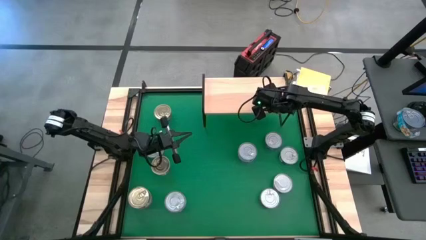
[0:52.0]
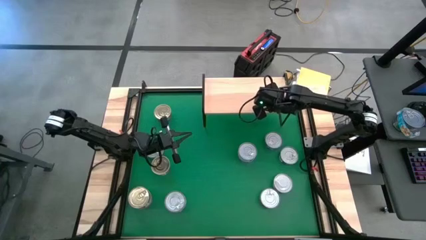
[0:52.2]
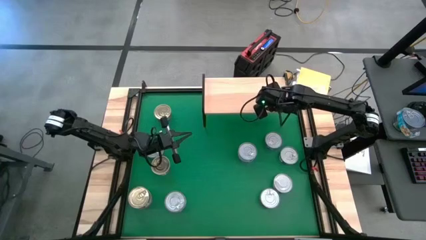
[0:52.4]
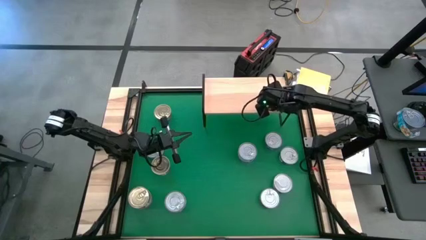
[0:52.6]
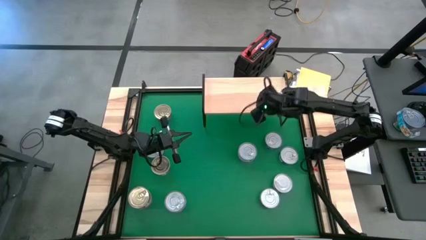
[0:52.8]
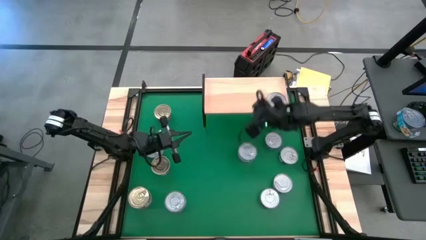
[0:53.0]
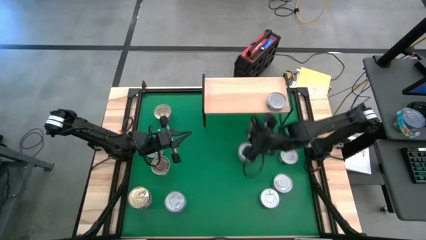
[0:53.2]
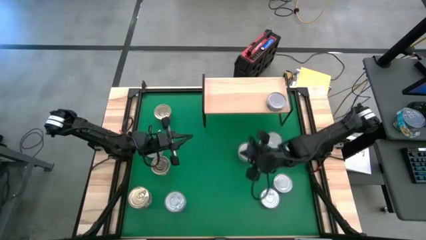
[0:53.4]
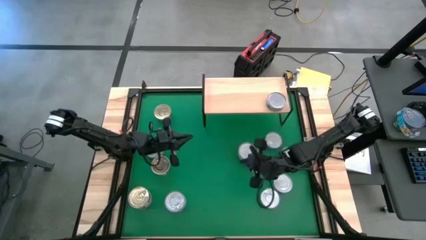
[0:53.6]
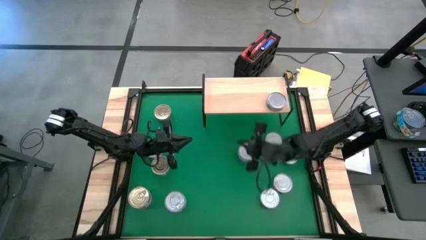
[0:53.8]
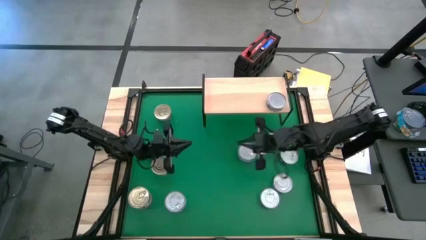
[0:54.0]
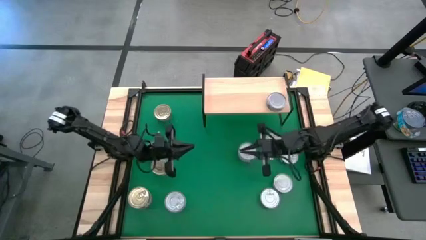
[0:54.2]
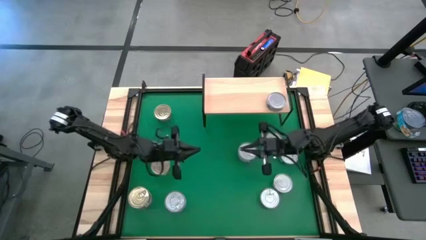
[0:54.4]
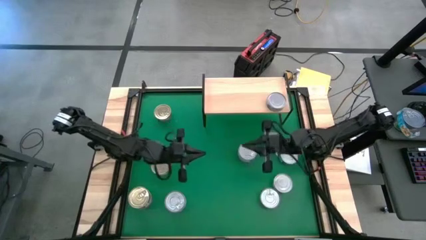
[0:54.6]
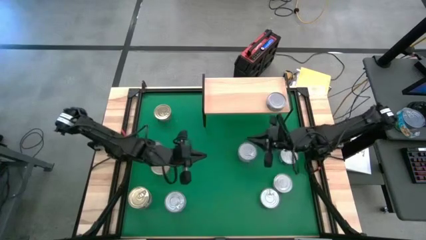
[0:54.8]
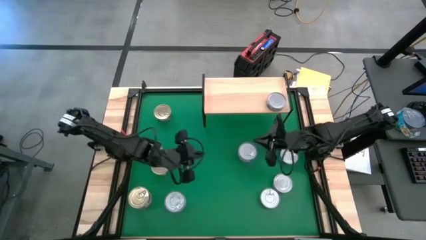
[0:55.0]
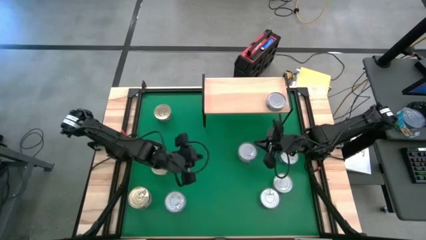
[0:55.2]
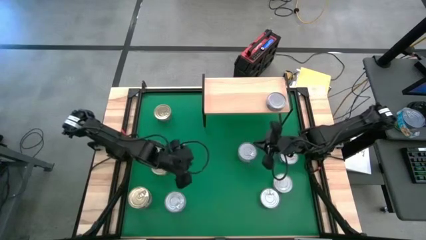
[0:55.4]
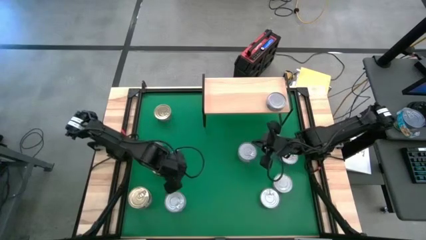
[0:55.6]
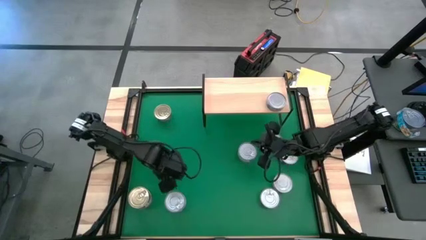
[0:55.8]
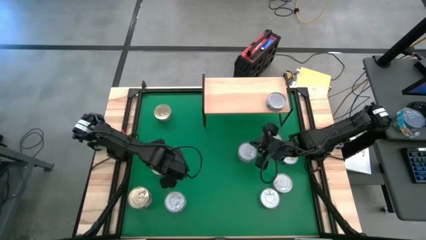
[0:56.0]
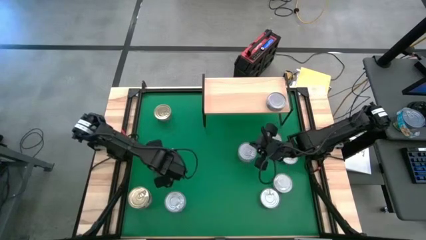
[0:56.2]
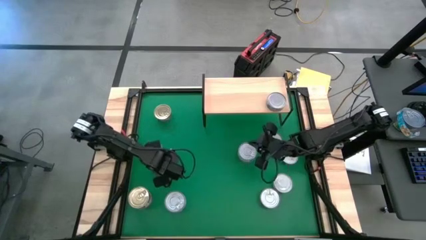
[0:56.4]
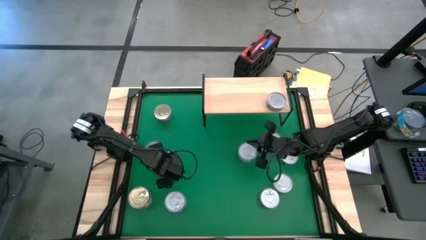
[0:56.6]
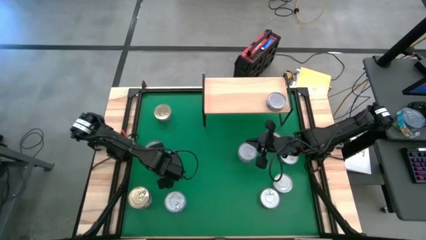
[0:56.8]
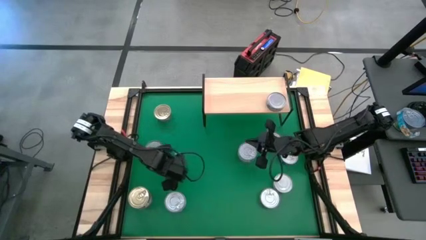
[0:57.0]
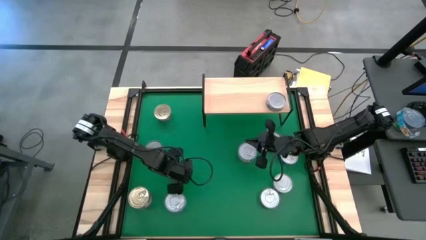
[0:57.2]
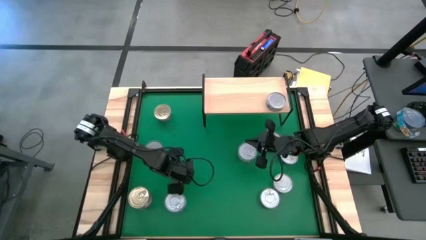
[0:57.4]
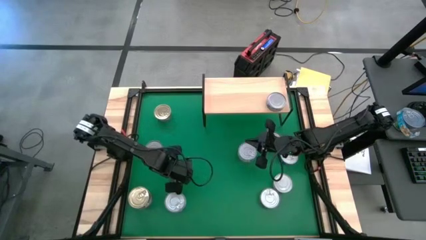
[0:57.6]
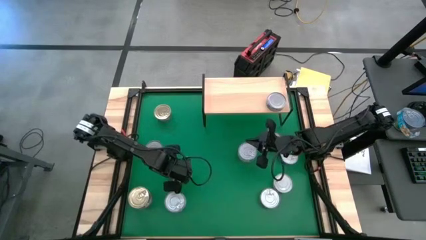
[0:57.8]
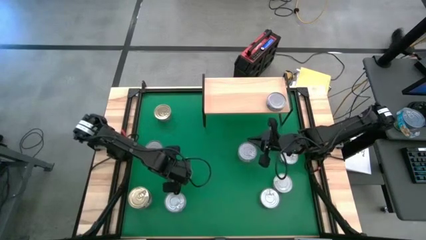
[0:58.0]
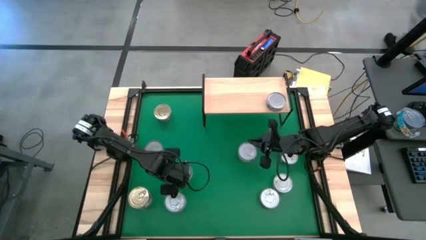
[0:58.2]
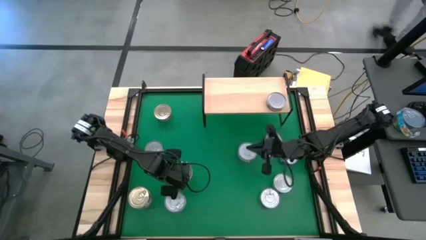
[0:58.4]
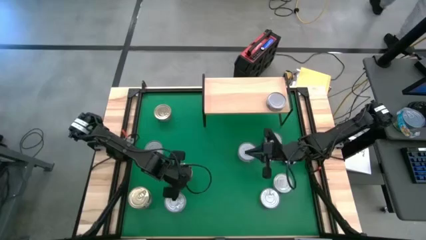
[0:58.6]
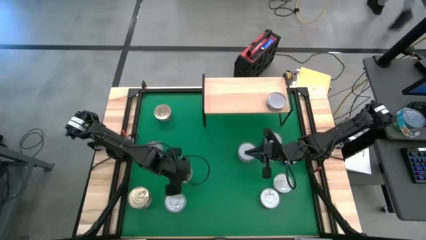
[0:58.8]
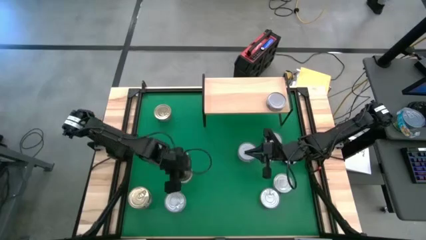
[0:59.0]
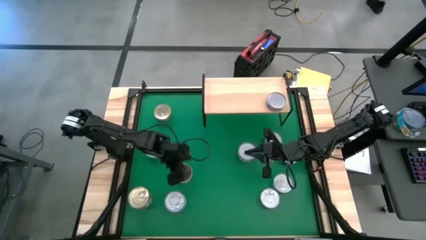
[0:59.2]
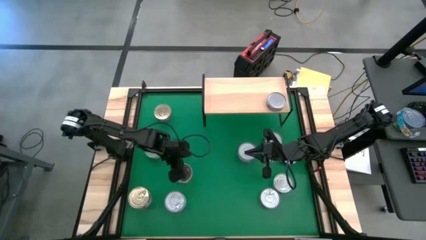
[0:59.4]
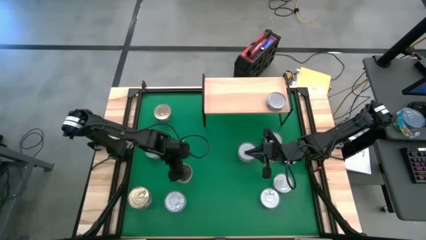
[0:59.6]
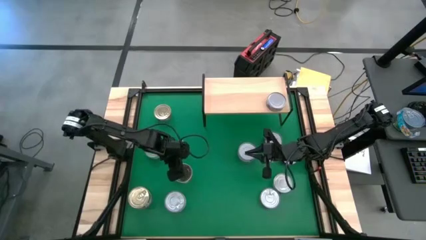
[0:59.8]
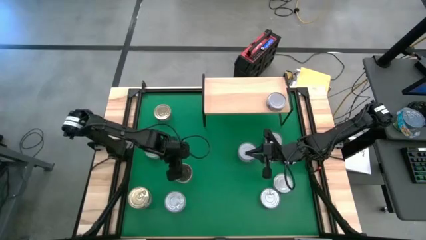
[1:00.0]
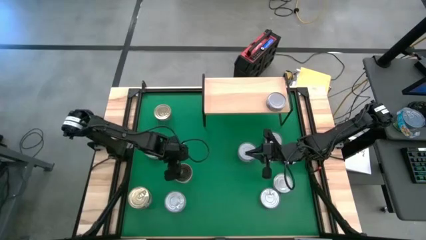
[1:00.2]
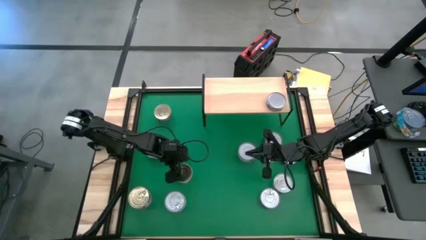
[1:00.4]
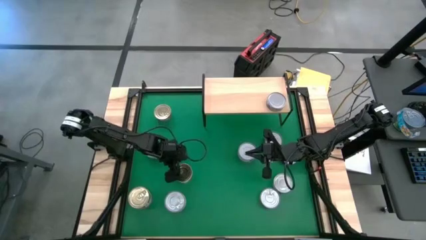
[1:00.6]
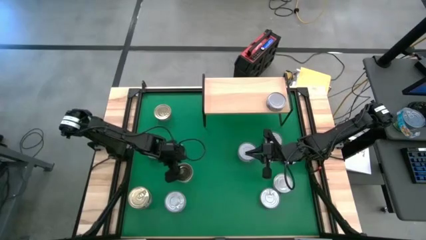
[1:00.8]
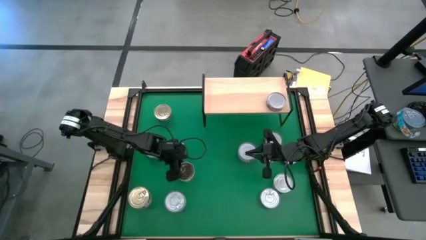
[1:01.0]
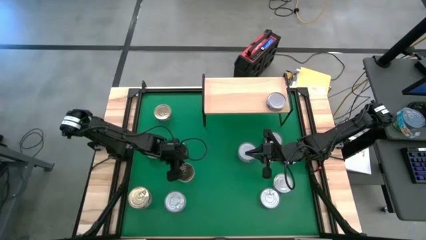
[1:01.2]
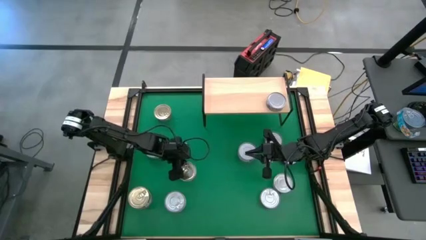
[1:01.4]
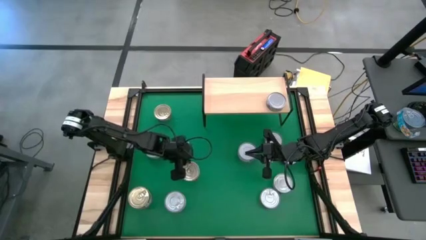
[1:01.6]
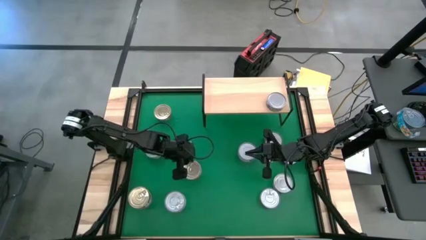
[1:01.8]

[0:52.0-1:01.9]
Task: Stack canned seafood by type on shelf
Put the blue/pink tuna can on the shelf
